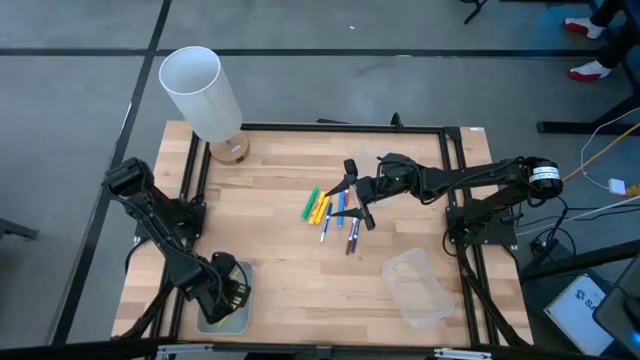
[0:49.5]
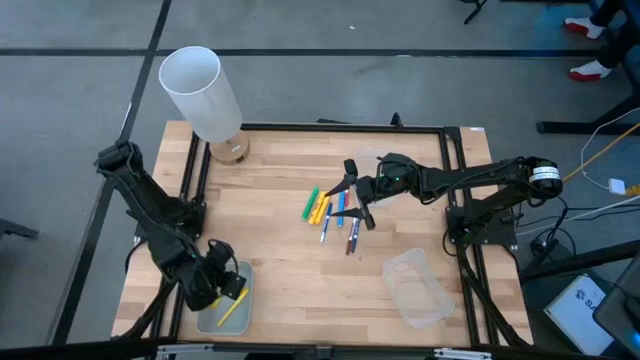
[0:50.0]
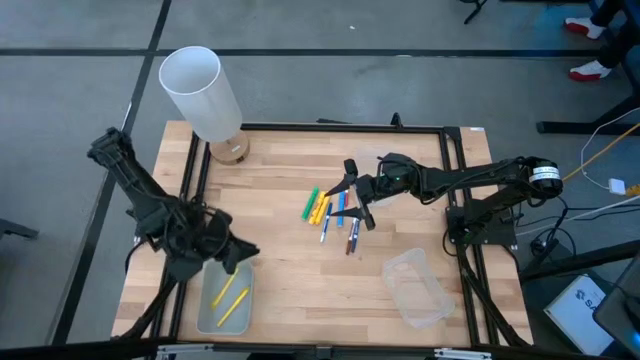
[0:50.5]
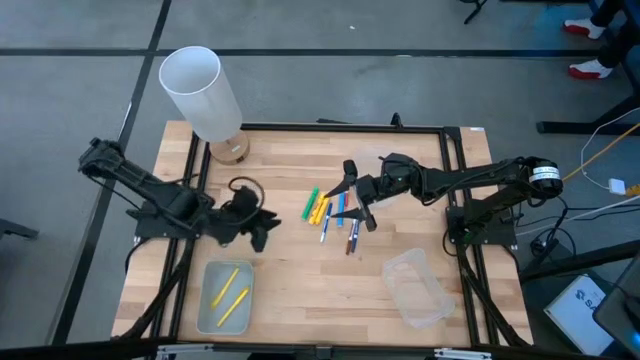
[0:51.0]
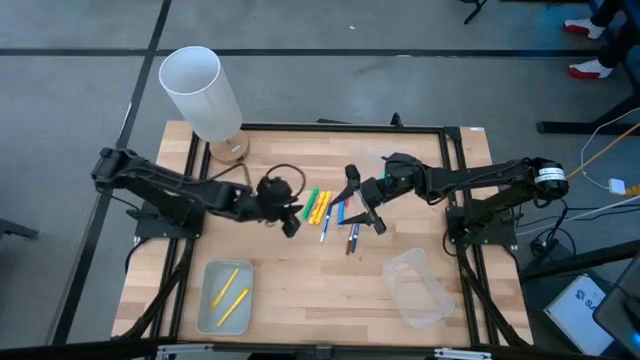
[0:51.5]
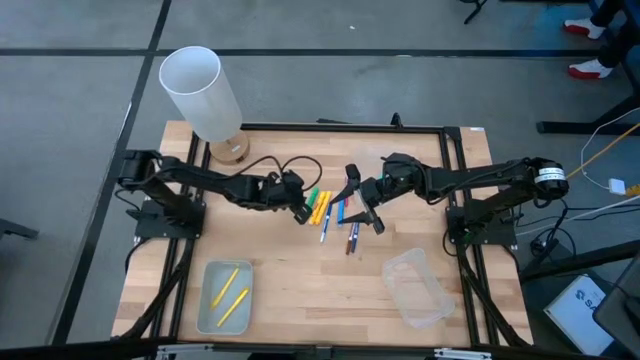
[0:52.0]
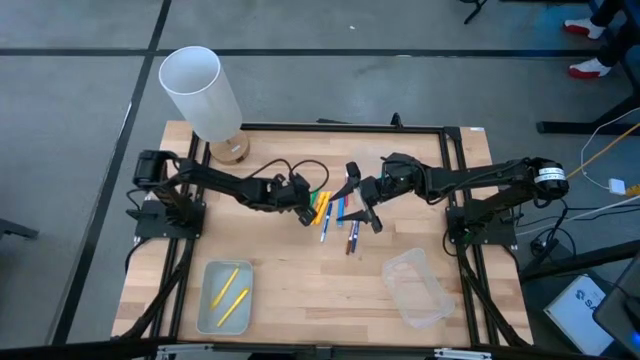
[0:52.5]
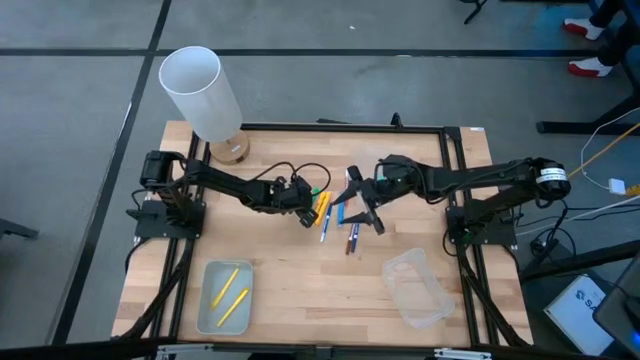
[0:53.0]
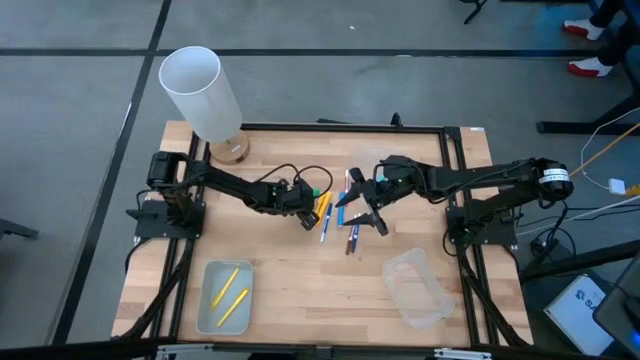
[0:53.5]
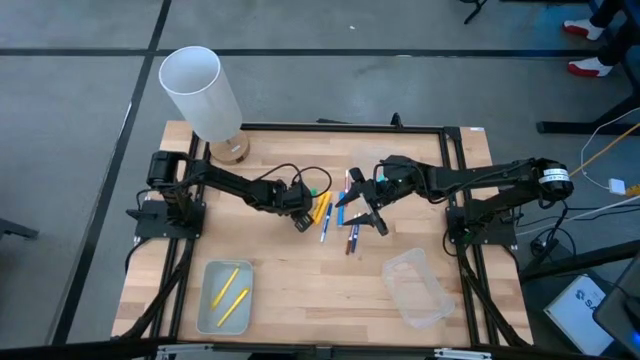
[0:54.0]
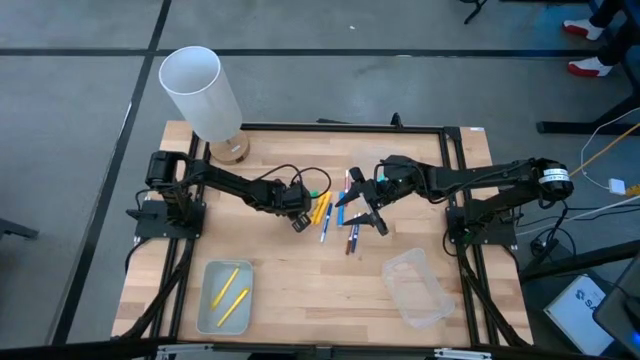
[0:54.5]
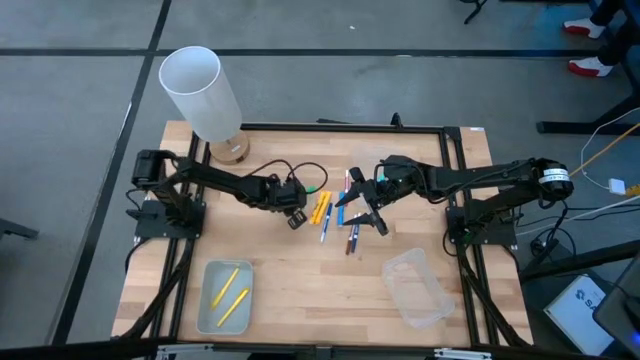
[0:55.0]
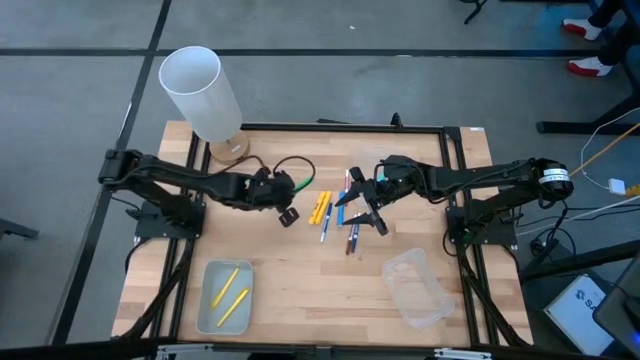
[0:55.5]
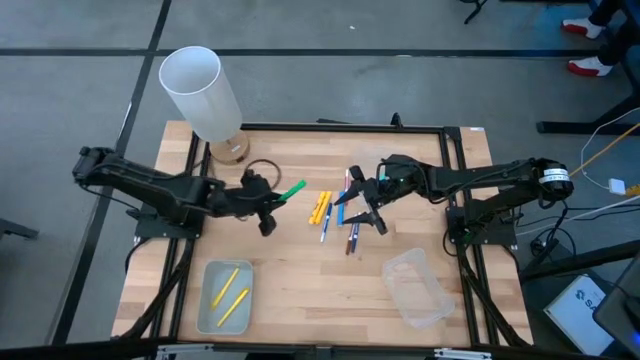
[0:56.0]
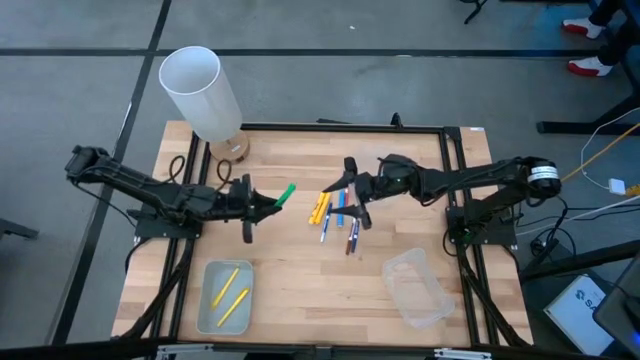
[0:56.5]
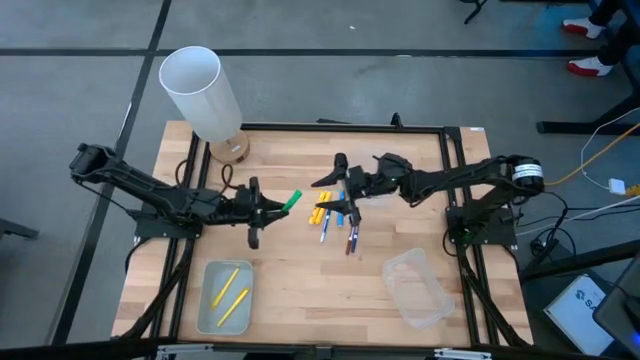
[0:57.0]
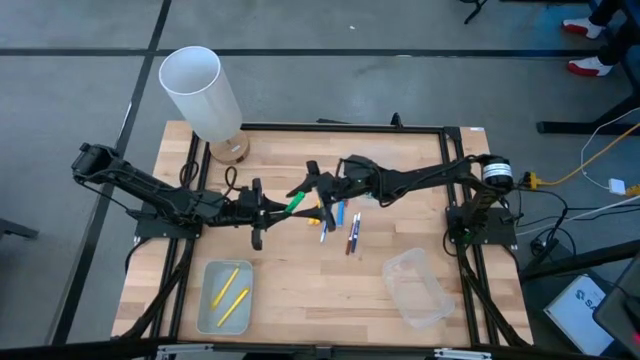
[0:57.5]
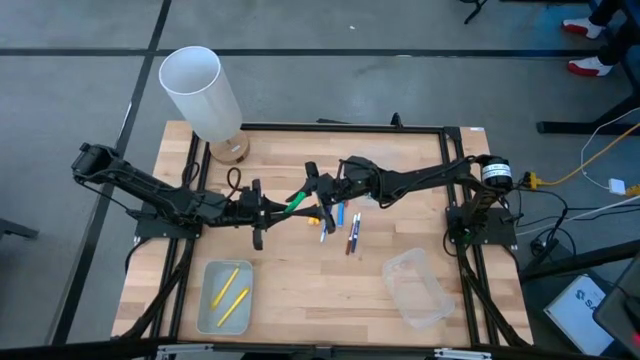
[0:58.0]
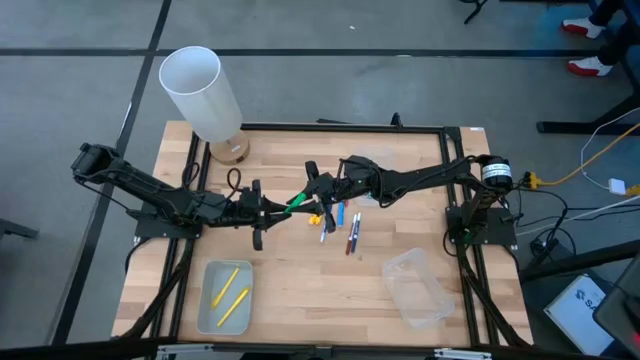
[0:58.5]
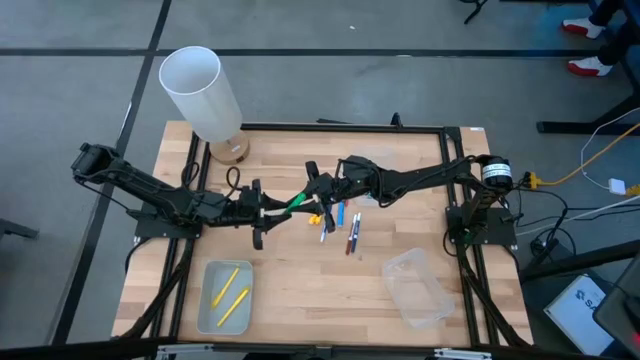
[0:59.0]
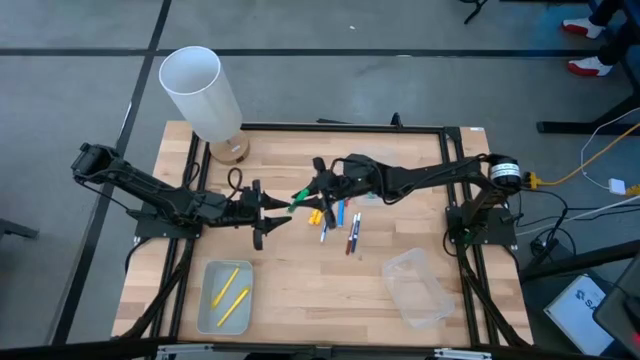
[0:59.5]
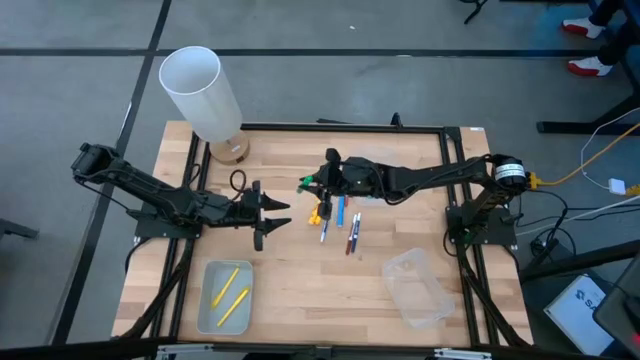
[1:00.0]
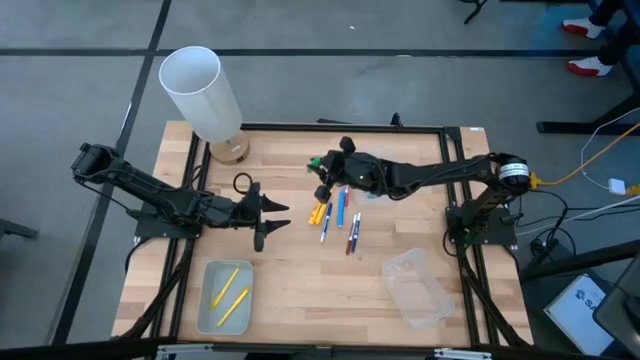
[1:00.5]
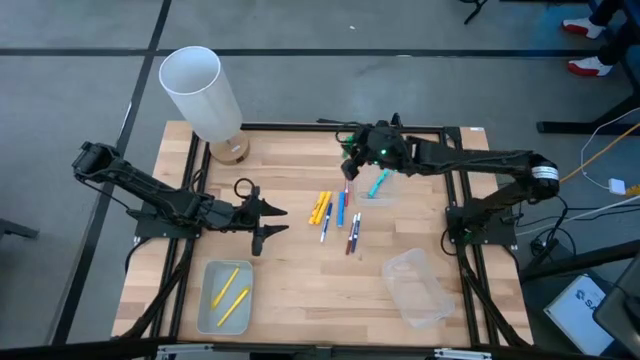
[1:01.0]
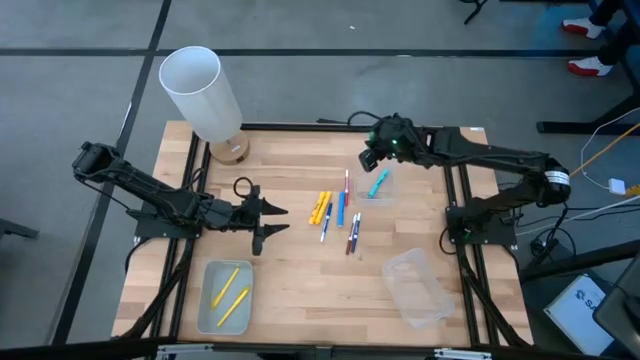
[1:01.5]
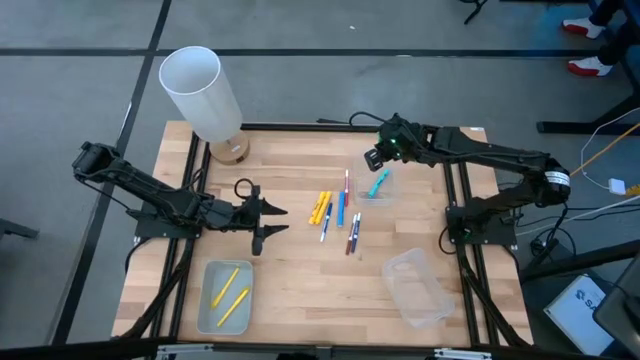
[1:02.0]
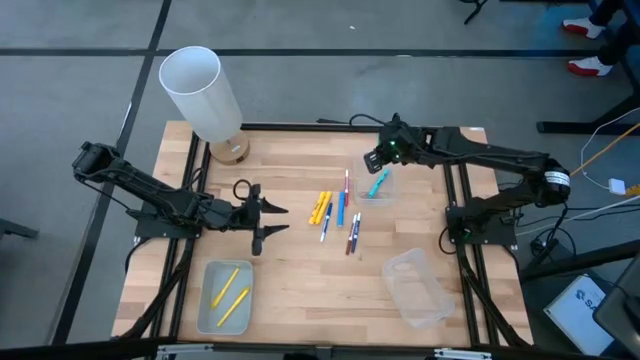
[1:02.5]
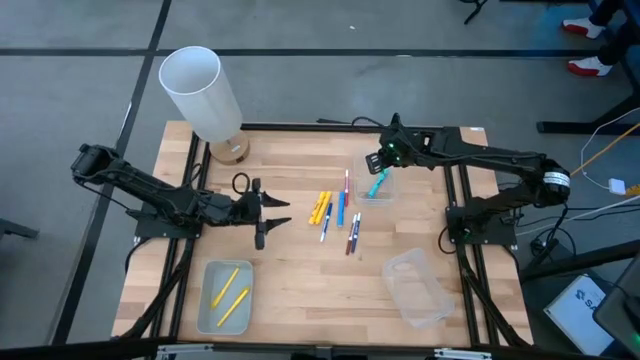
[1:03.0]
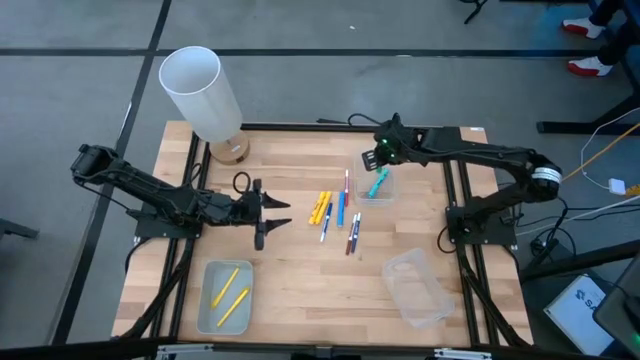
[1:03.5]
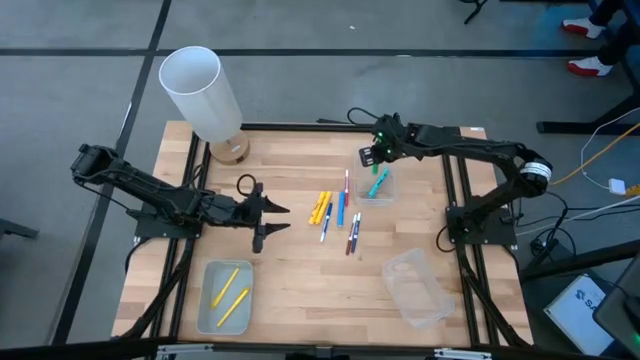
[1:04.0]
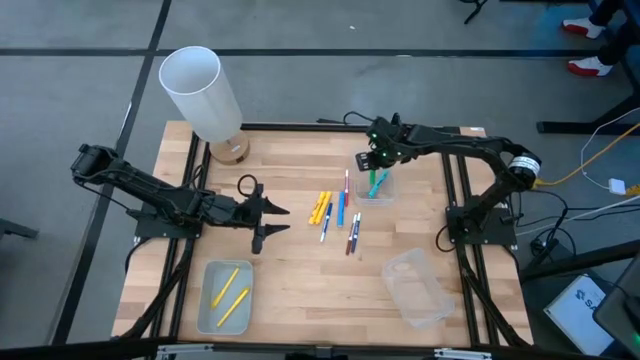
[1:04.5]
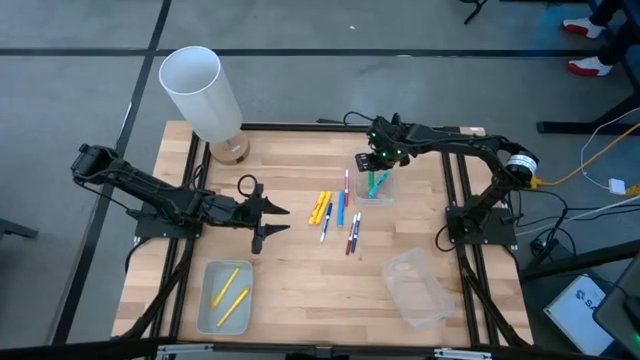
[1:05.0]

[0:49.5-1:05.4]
Task: Pick & Place Markers
Put the green highlighter pen into the top transparent bin

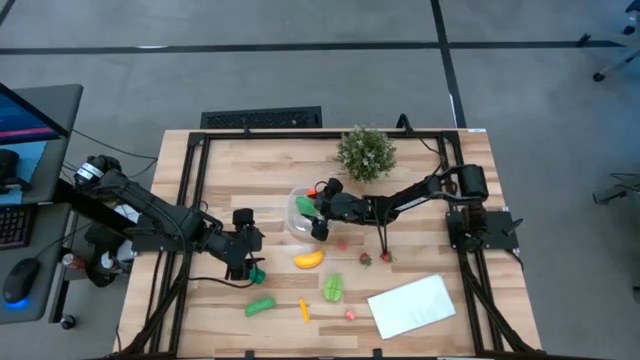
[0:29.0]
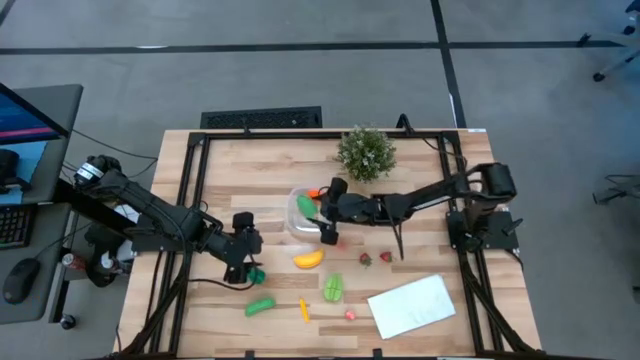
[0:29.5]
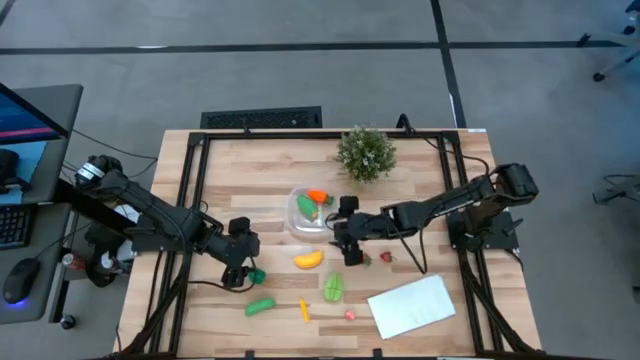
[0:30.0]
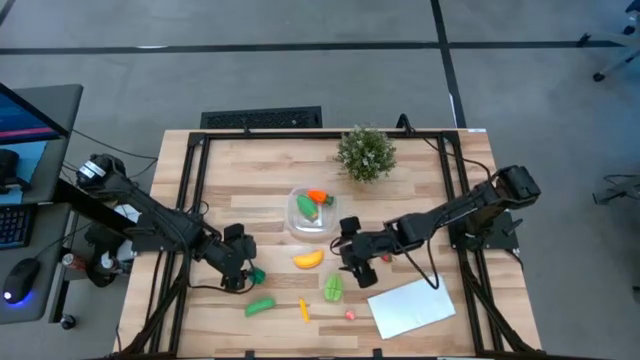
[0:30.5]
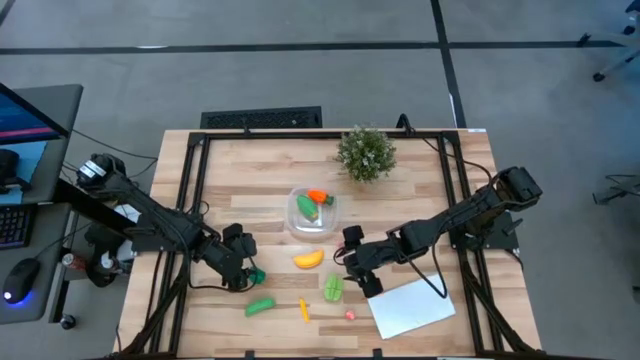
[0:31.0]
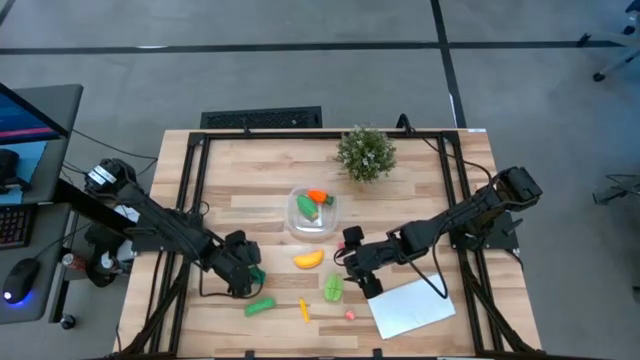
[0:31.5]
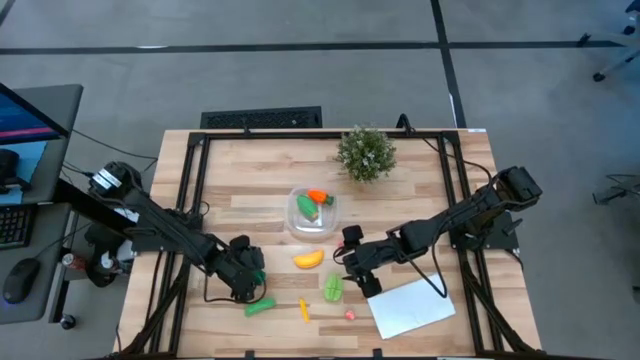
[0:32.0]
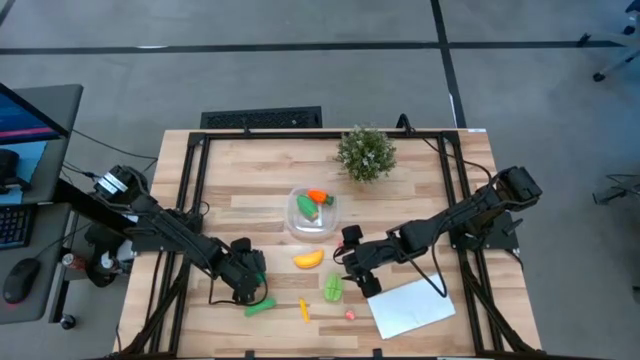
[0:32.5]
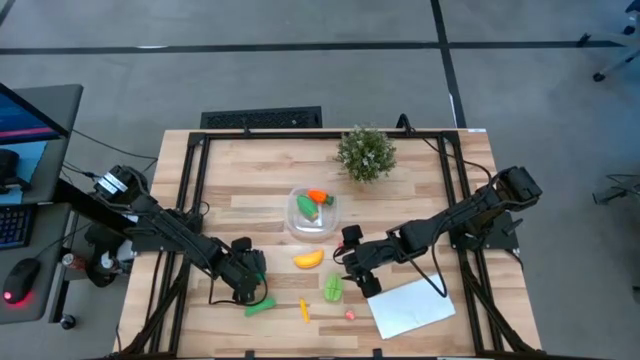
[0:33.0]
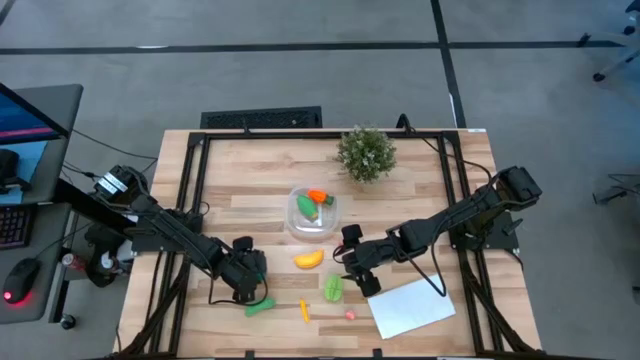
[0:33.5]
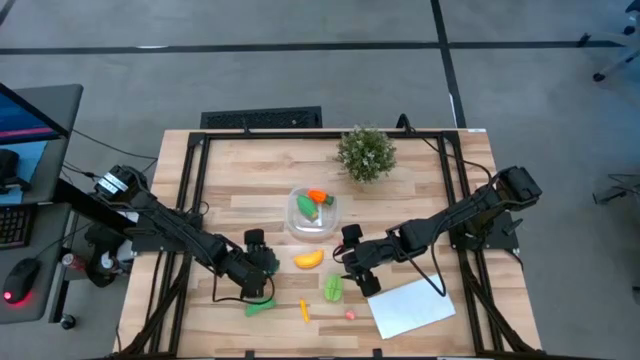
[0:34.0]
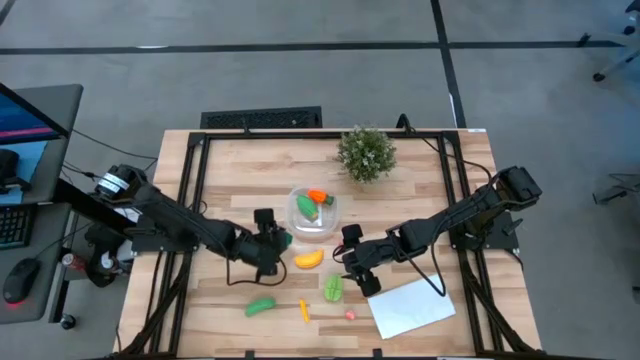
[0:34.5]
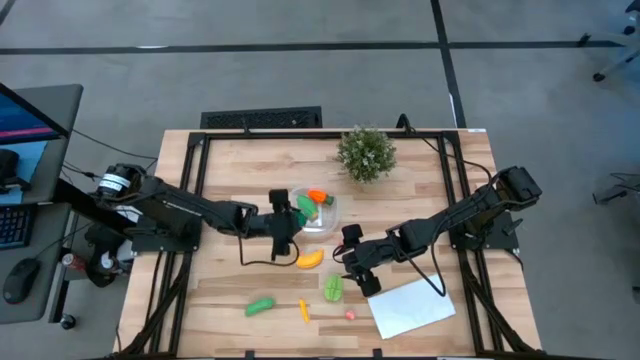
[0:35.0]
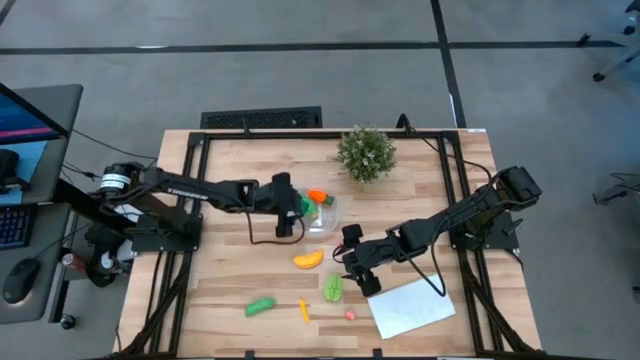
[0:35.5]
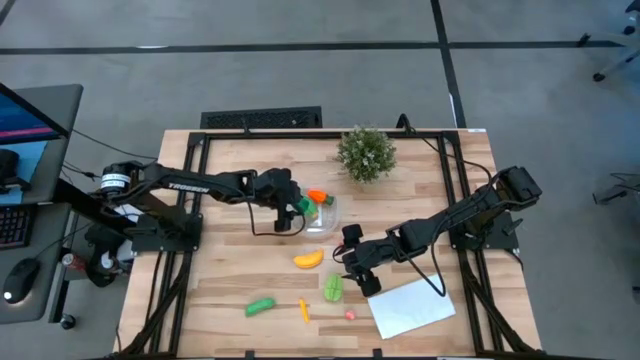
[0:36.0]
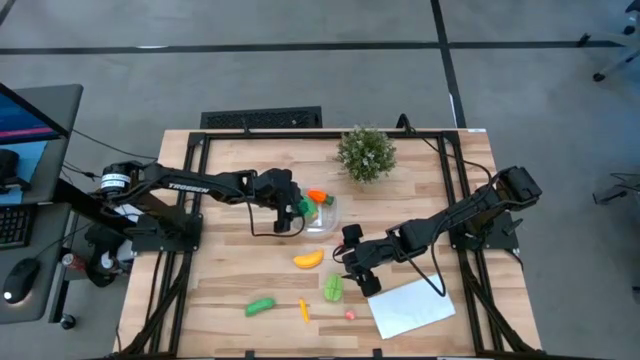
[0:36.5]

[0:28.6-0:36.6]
Task: Pick and placing Produce into tupperware
Put the green bell pepper into the transparent container
